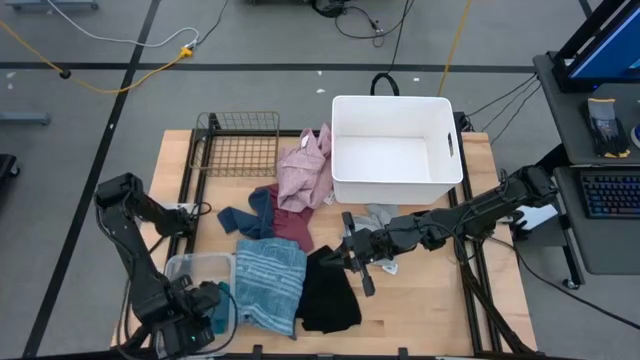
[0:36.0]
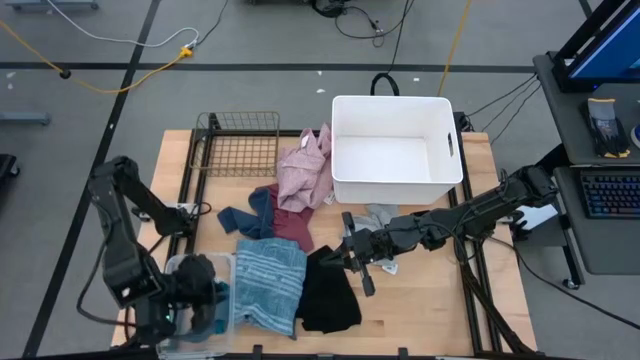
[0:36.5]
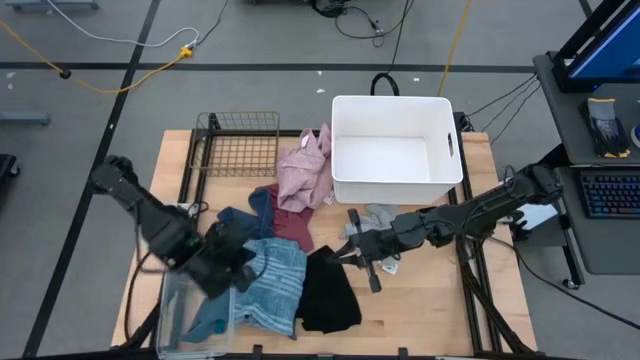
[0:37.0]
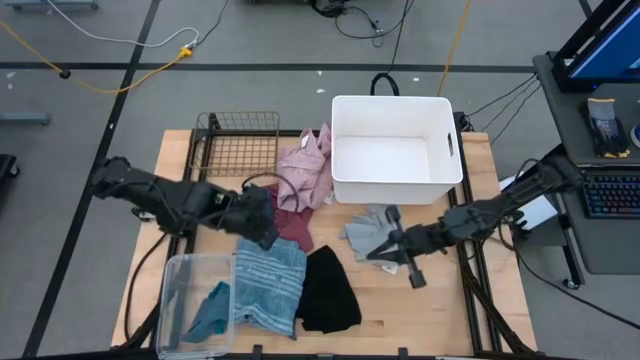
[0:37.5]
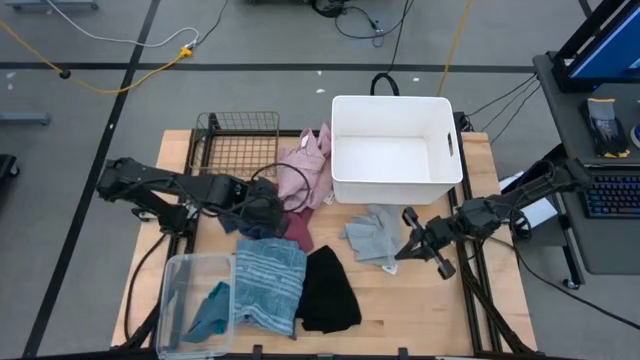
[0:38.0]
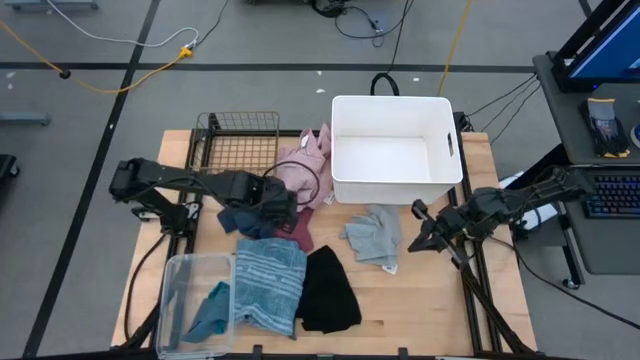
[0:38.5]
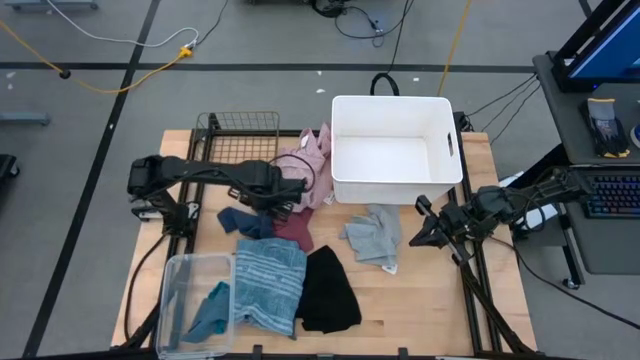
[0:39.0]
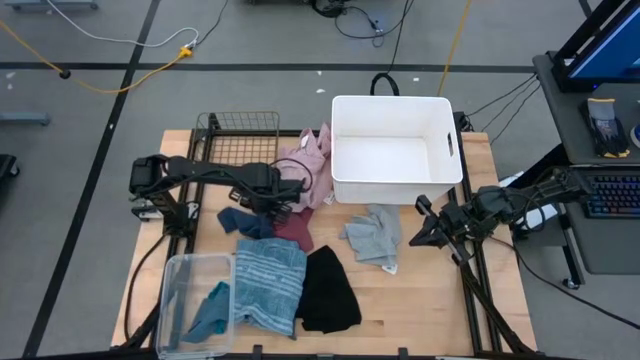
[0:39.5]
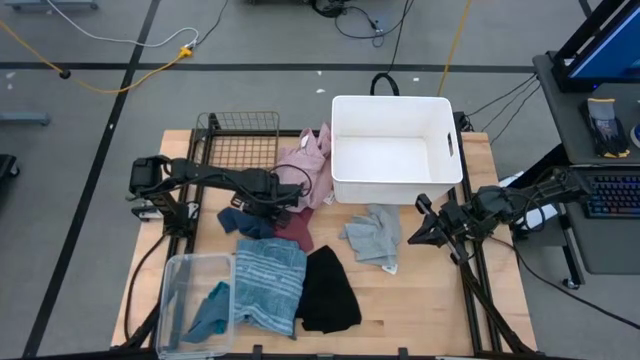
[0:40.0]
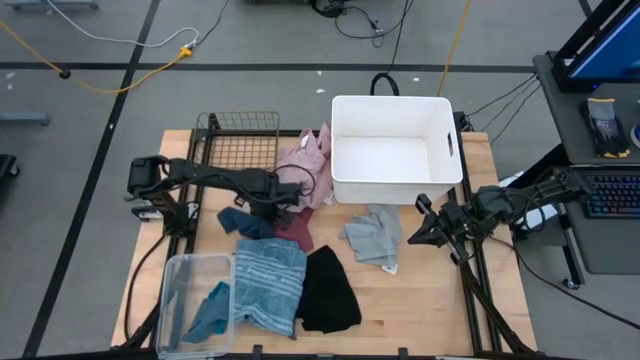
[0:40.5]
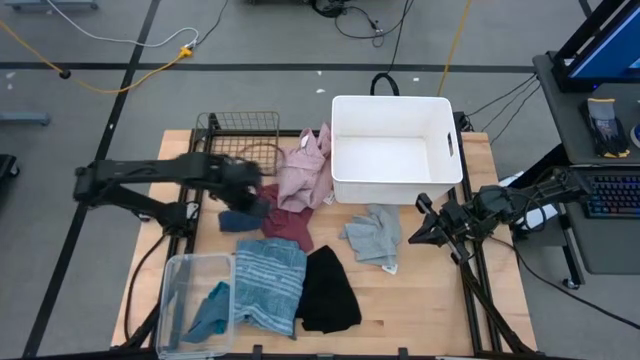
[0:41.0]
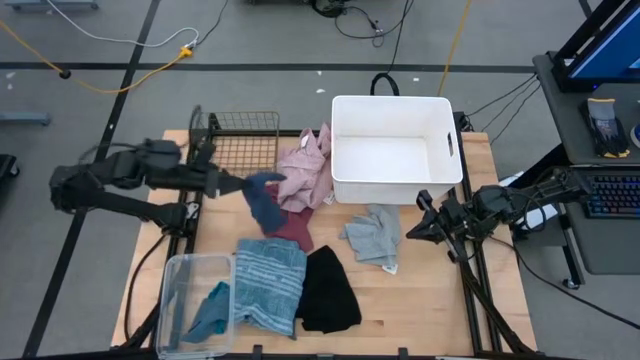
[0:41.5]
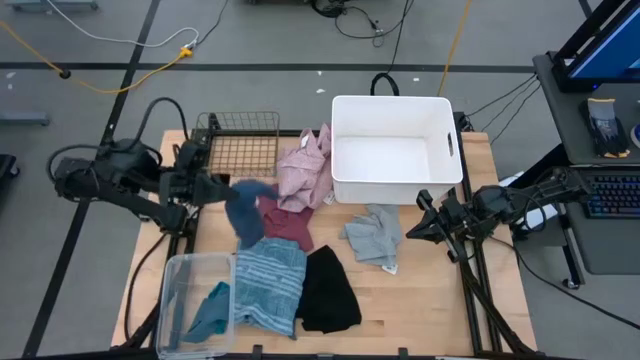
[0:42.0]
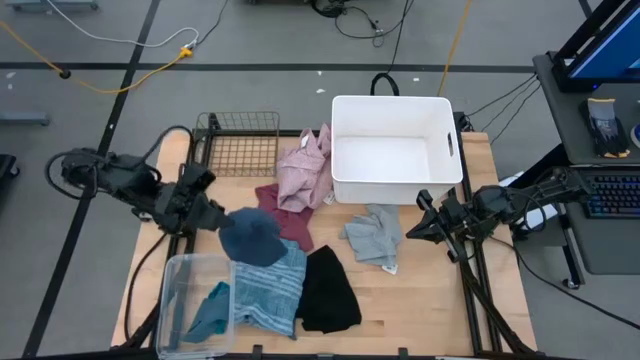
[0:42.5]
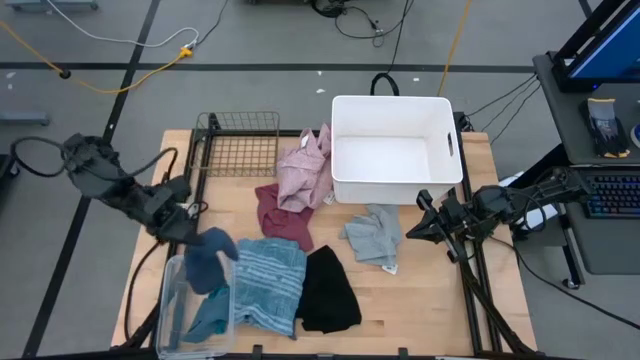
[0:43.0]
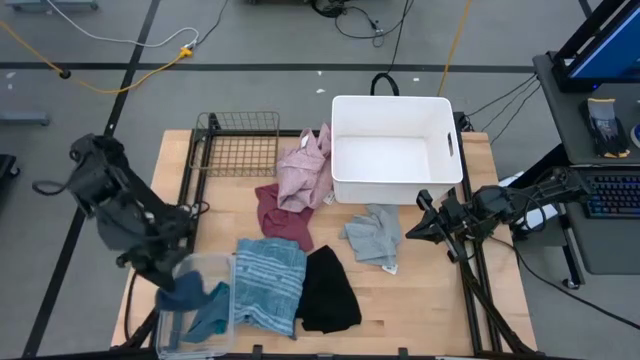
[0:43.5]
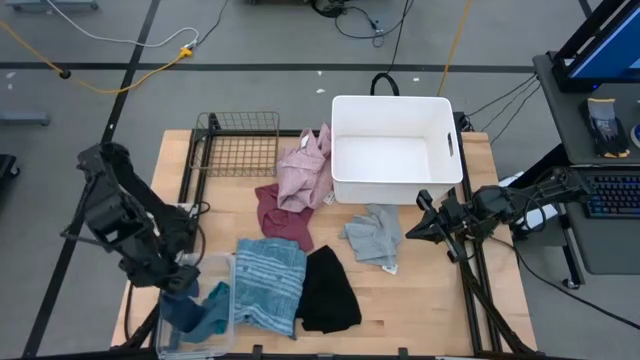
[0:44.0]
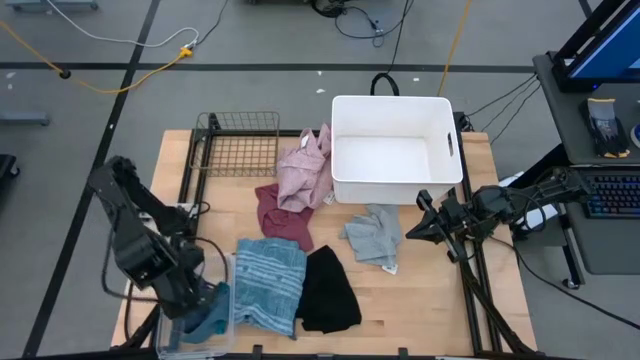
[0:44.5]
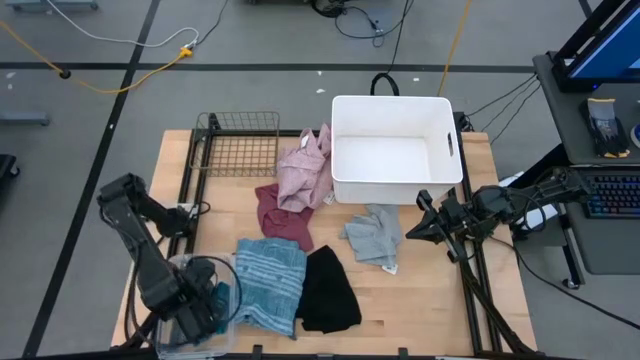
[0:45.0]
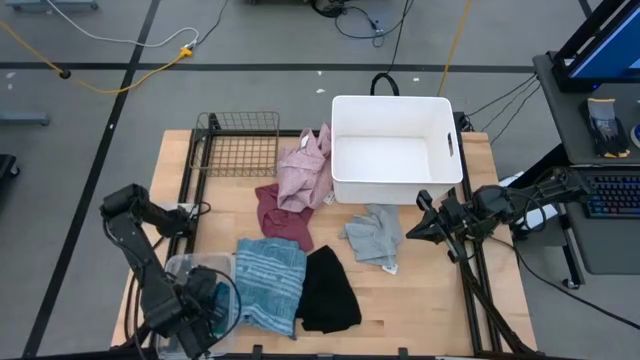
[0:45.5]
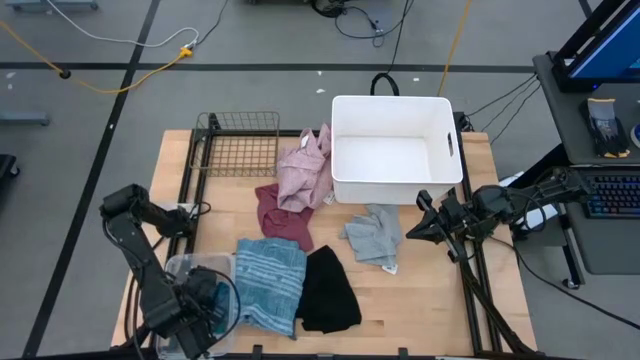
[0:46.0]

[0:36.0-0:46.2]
Task: Pick & Place Cloths
Put the blue sock into the transparent bin

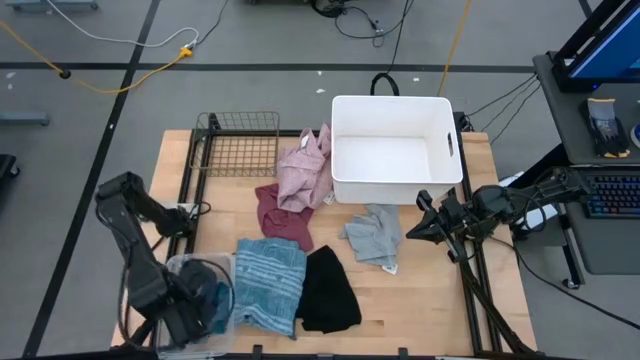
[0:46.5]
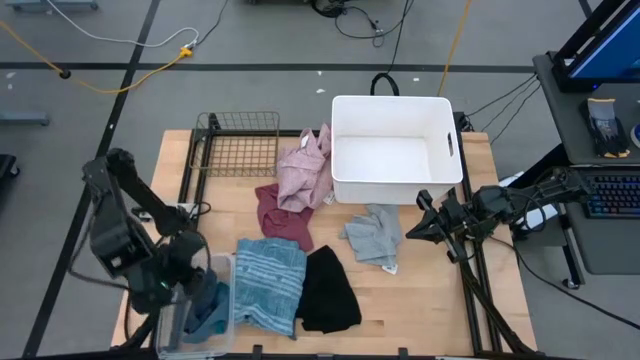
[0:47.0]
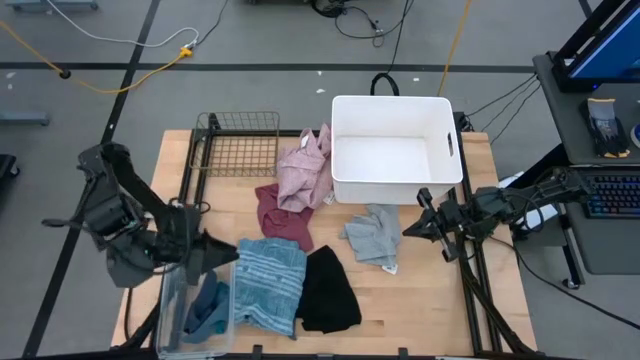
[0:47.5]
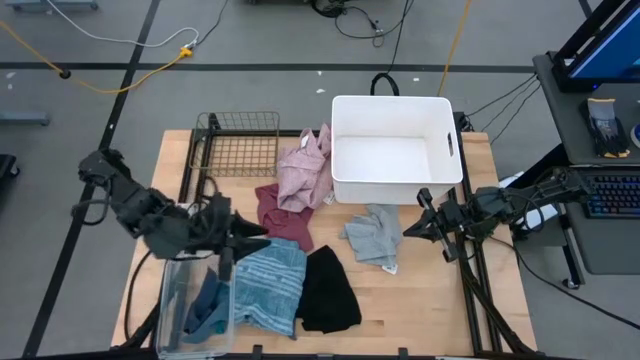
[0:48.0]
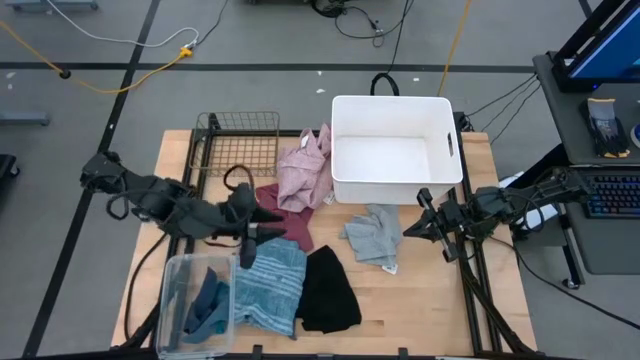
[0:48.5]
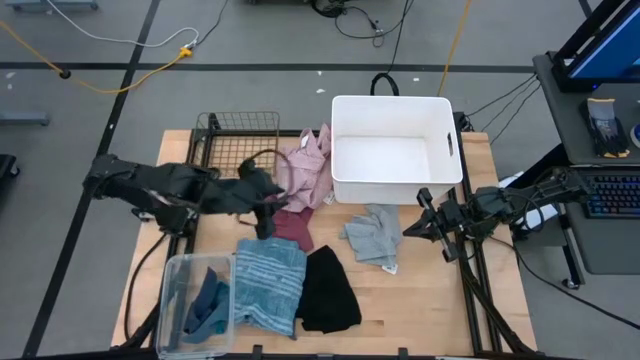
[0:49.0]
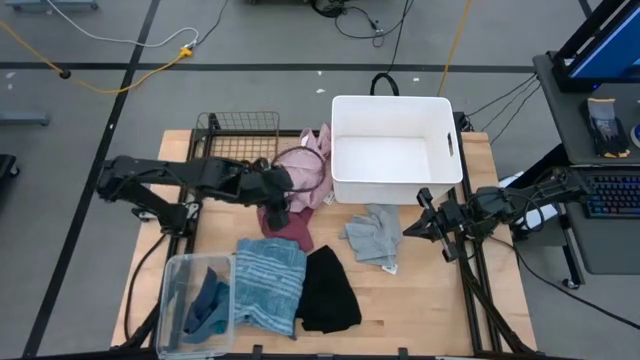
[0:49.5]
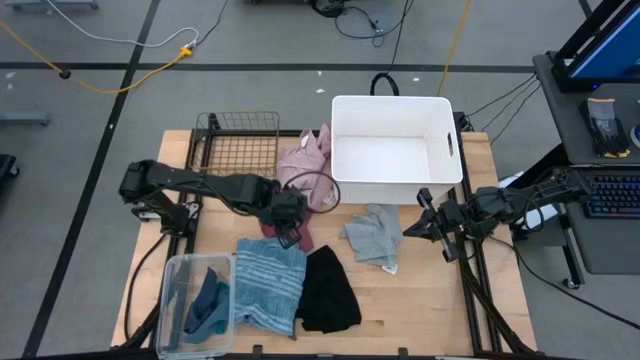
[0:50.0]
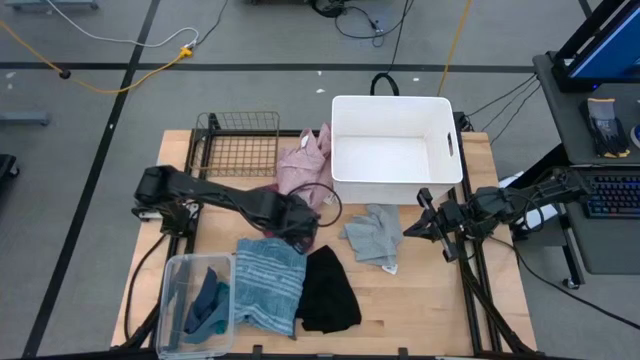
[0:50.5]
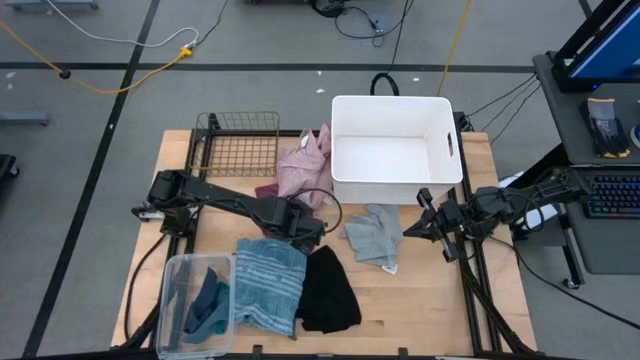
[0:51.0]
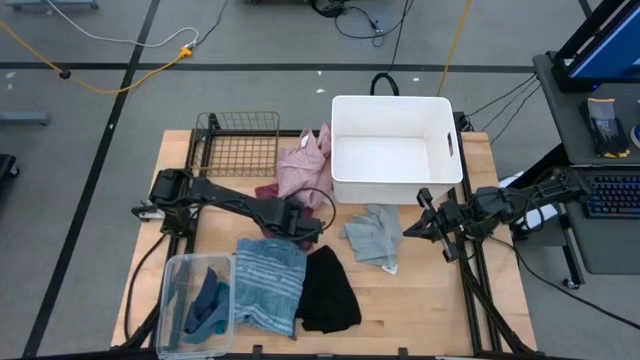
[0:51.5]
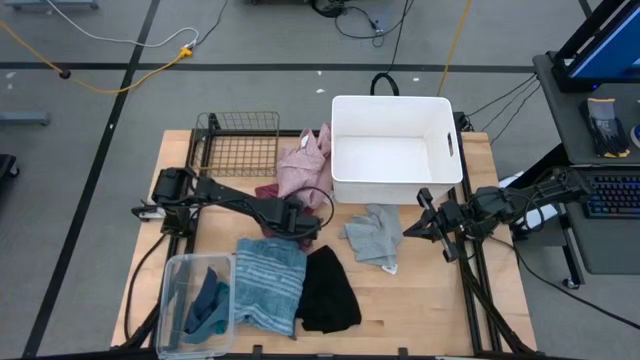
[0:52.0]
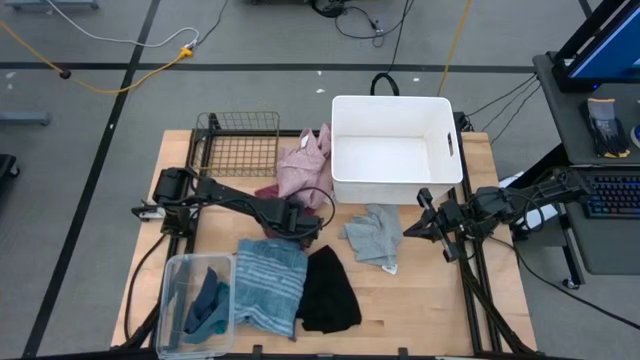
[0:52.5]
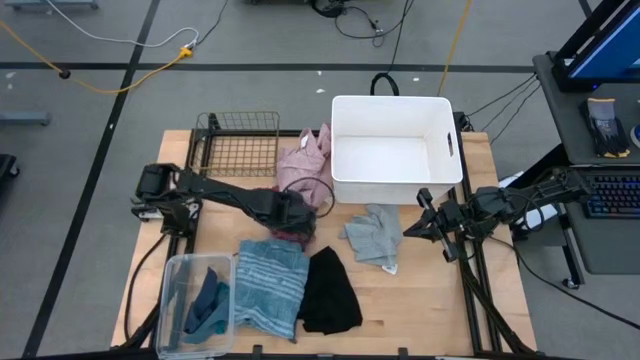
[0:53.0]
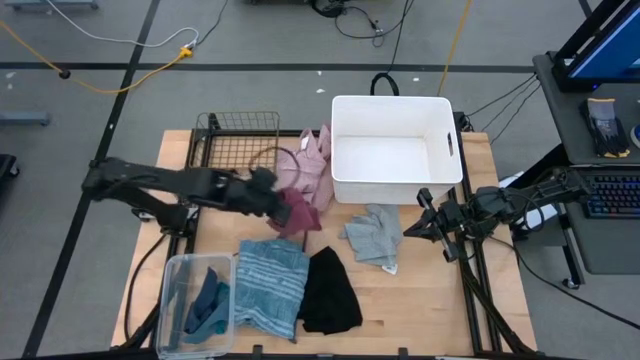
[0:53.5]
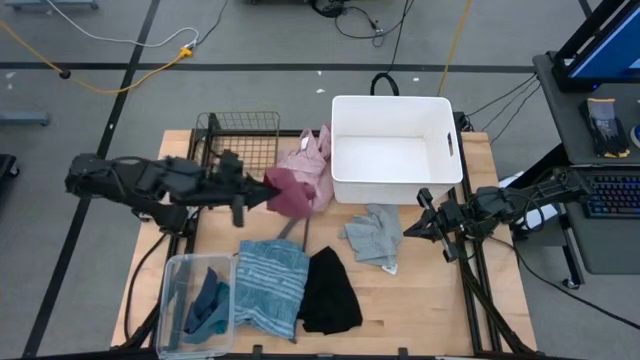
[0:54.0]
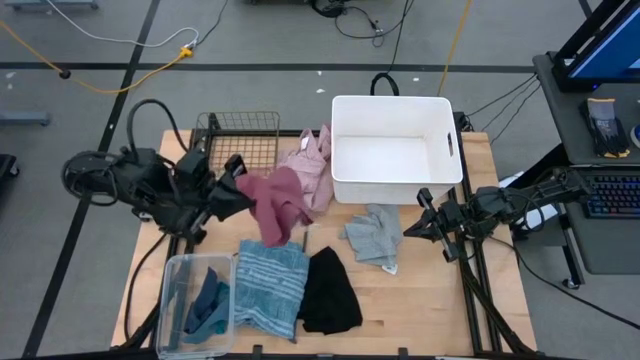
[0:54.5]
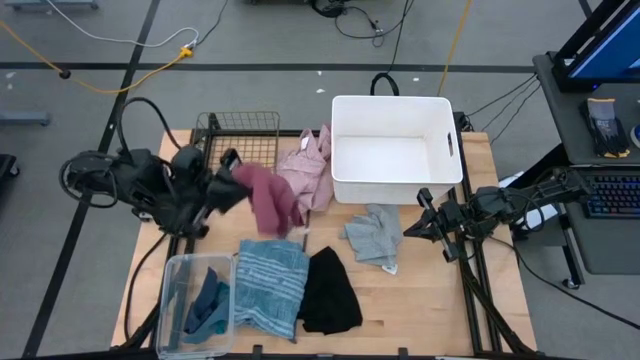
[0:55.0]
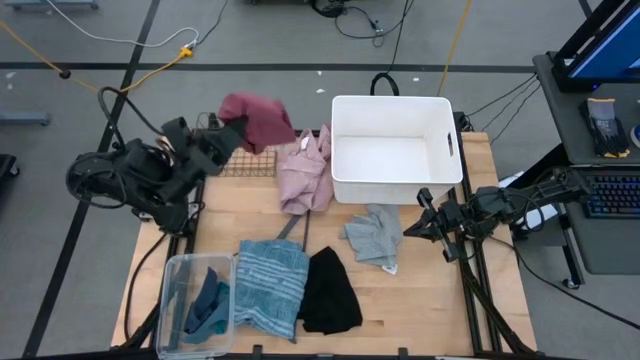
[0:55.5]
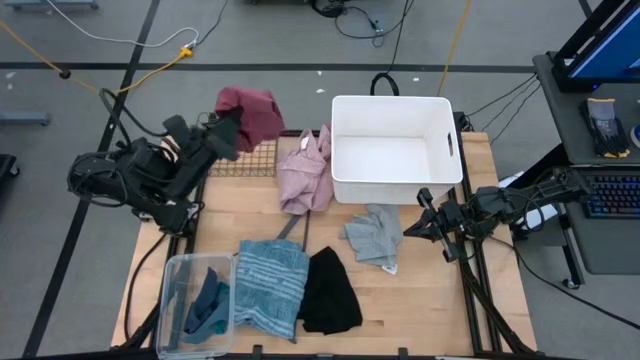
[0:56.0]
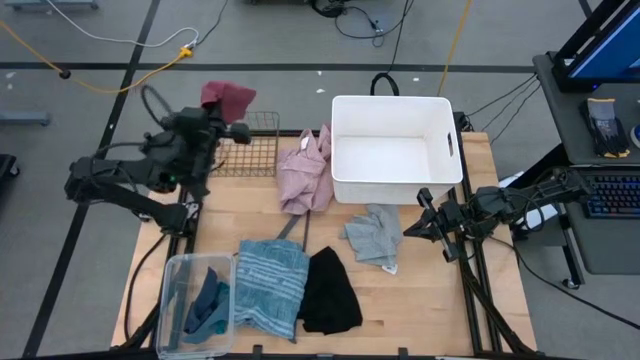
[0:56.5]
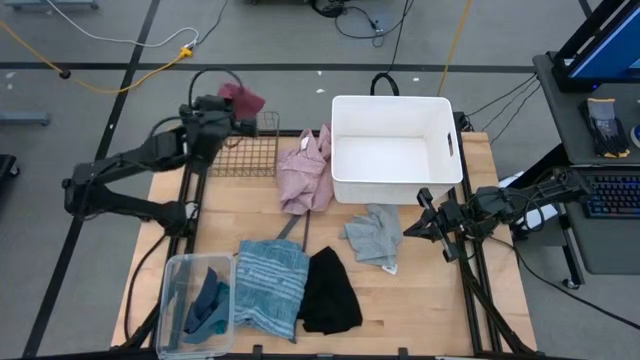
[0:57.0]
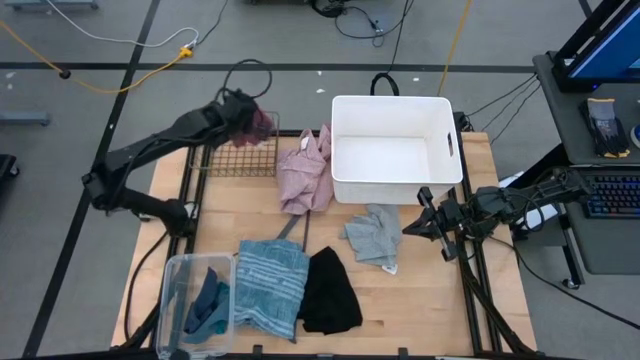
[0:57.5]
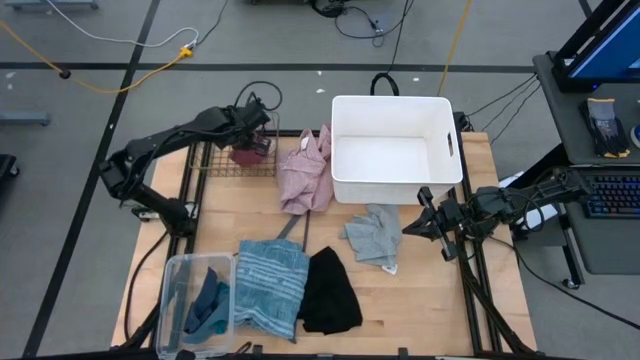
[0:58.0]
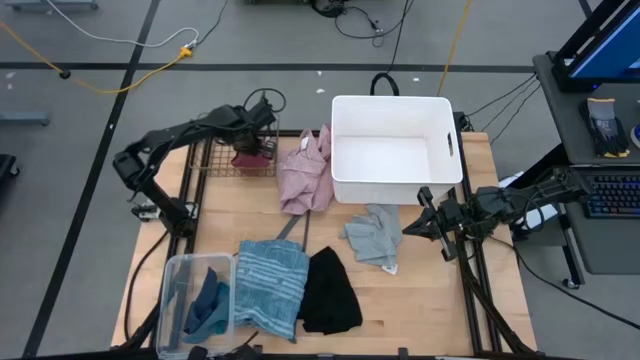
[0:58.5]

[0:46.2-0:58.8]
Put the red underwear into the wire basket
